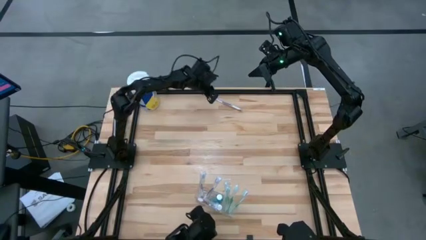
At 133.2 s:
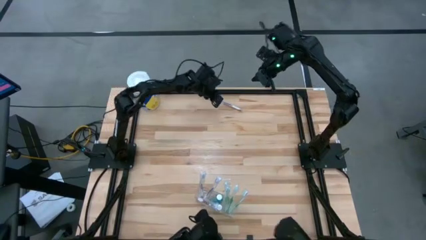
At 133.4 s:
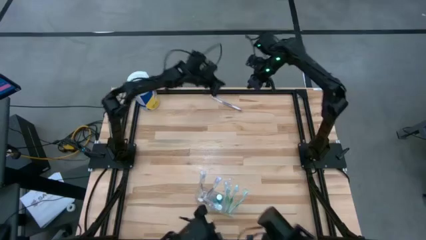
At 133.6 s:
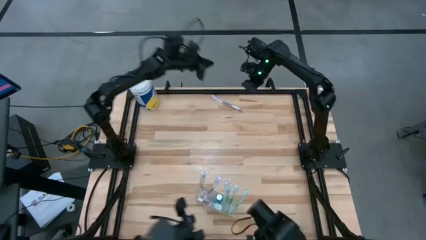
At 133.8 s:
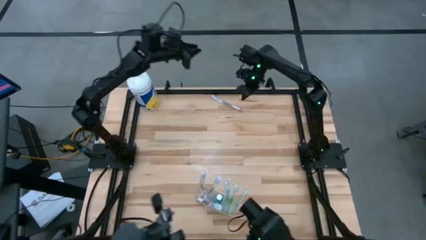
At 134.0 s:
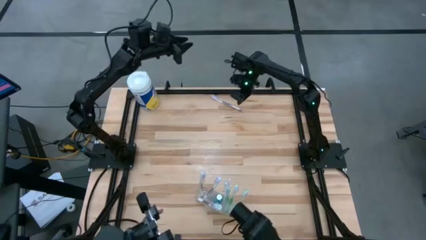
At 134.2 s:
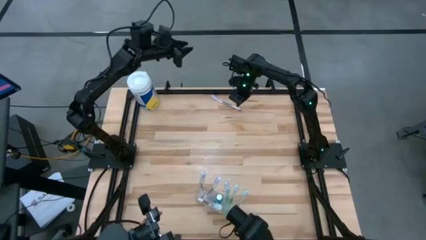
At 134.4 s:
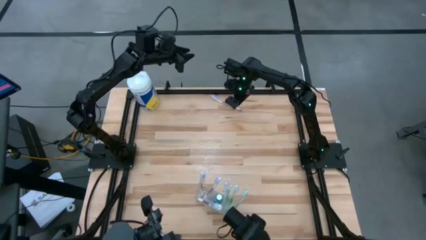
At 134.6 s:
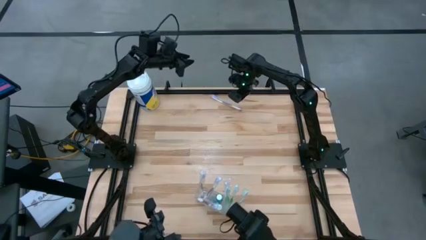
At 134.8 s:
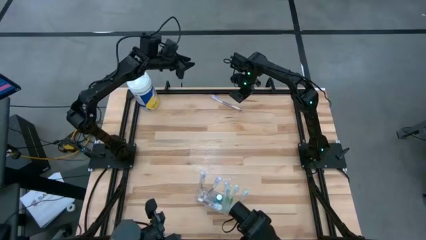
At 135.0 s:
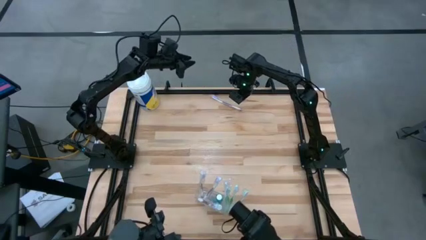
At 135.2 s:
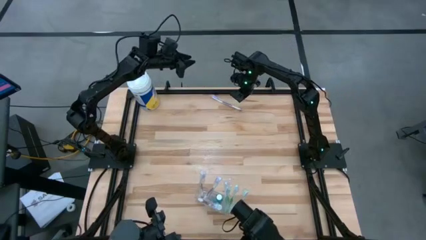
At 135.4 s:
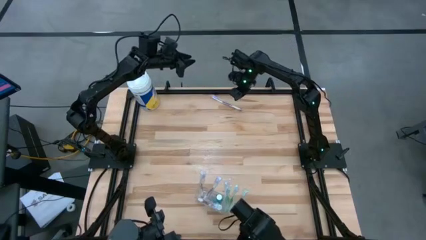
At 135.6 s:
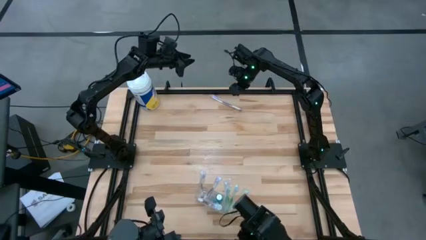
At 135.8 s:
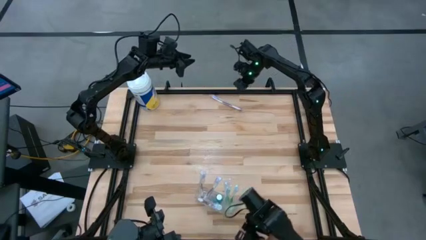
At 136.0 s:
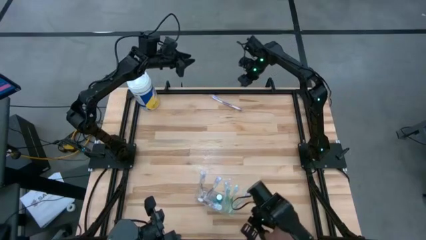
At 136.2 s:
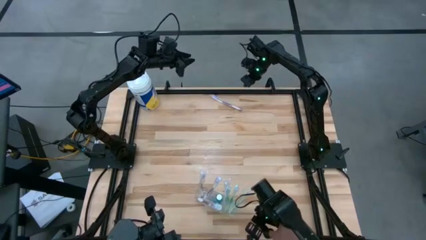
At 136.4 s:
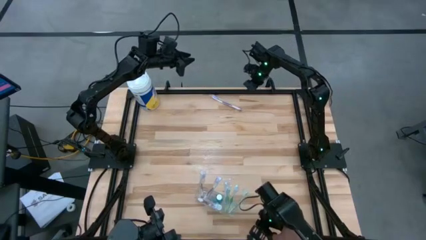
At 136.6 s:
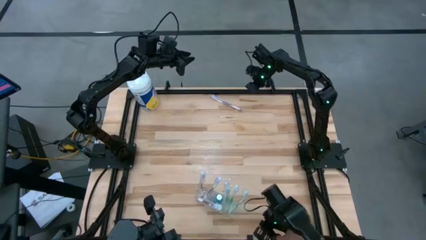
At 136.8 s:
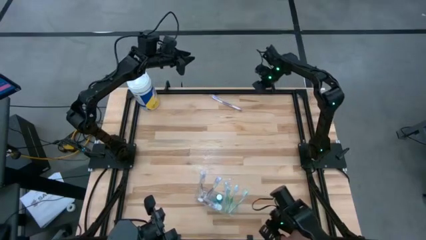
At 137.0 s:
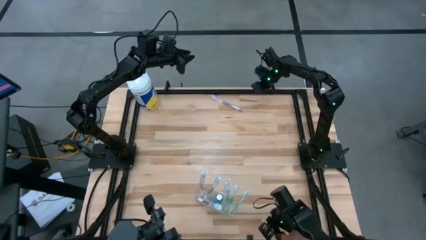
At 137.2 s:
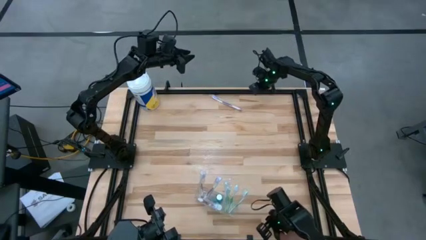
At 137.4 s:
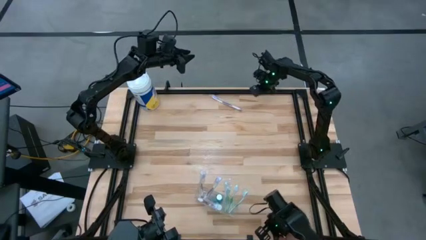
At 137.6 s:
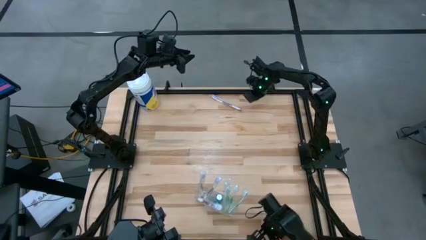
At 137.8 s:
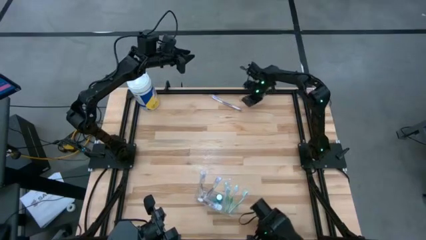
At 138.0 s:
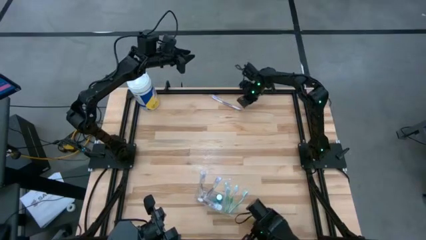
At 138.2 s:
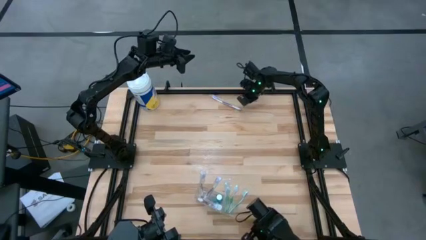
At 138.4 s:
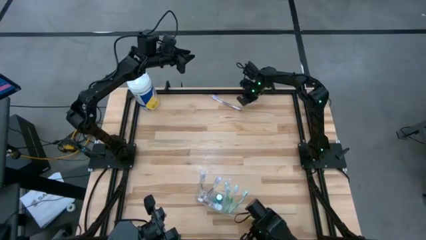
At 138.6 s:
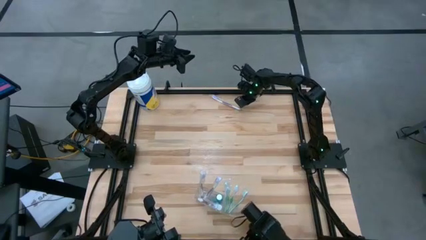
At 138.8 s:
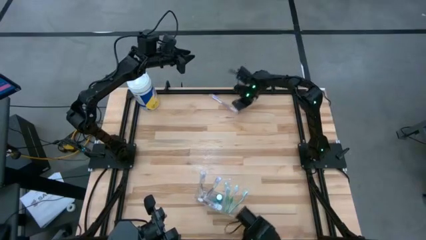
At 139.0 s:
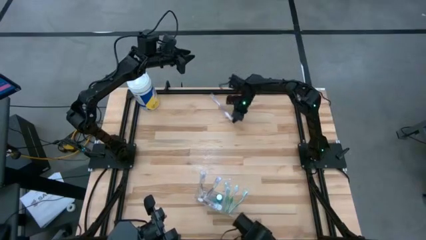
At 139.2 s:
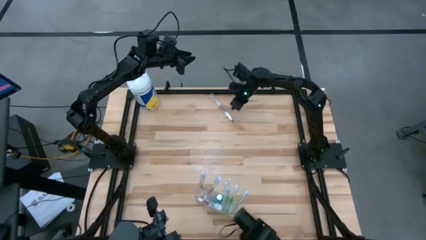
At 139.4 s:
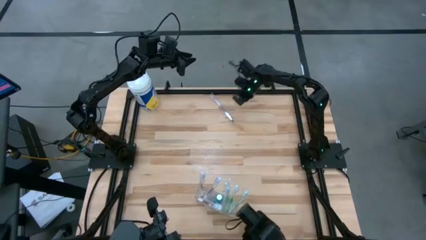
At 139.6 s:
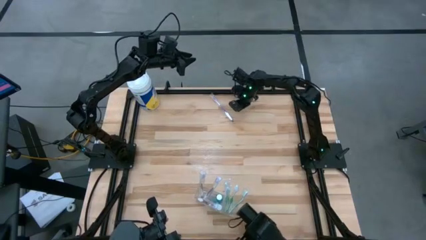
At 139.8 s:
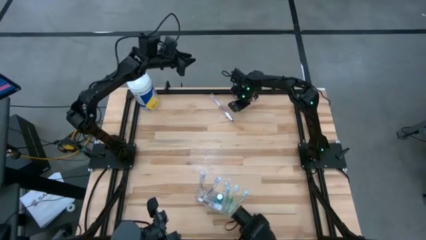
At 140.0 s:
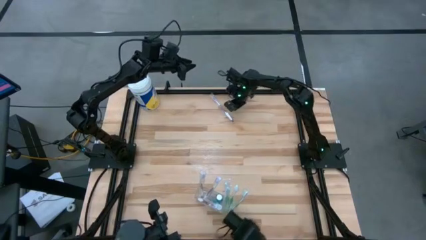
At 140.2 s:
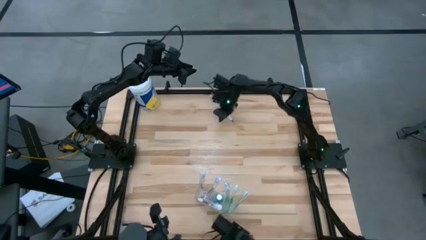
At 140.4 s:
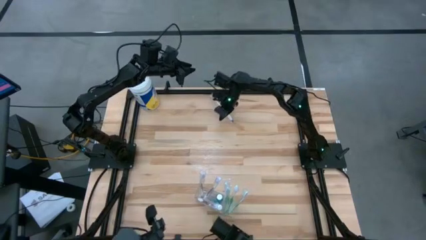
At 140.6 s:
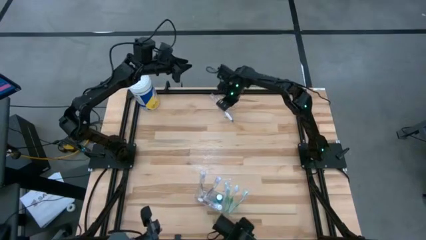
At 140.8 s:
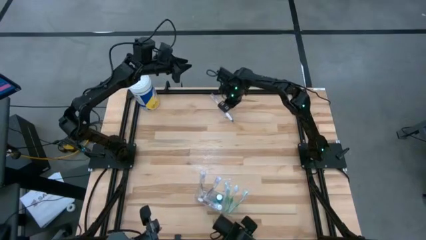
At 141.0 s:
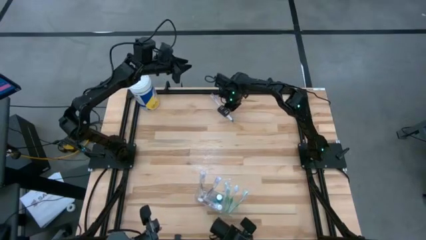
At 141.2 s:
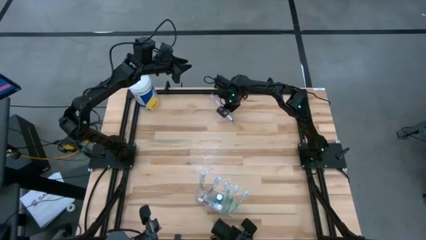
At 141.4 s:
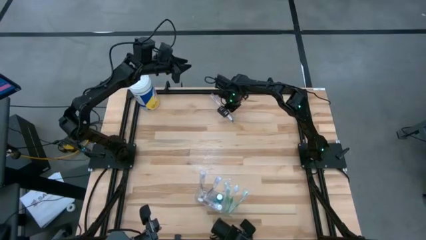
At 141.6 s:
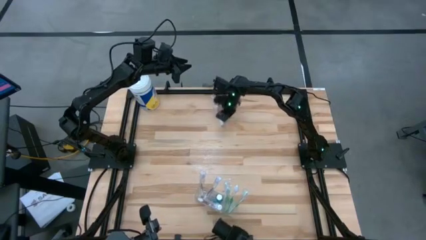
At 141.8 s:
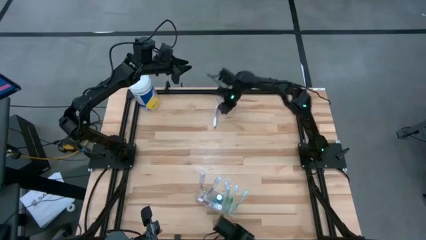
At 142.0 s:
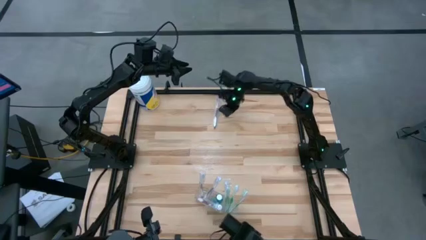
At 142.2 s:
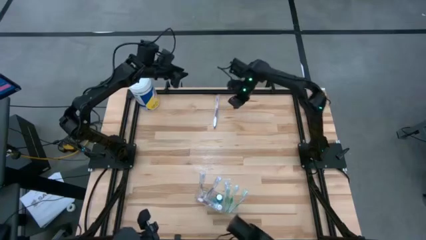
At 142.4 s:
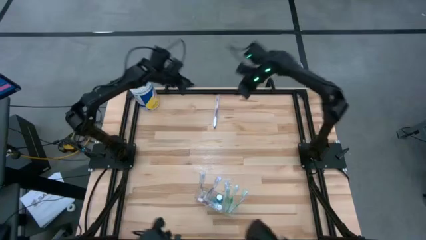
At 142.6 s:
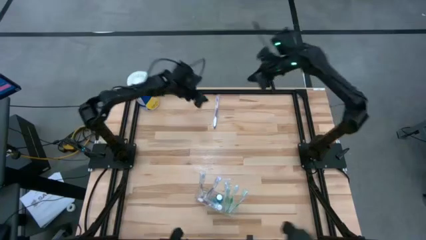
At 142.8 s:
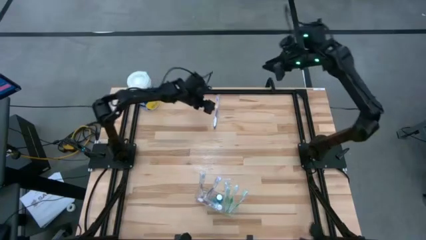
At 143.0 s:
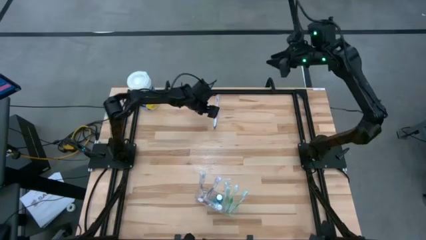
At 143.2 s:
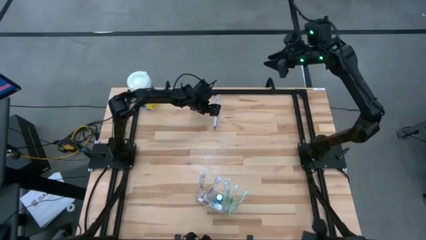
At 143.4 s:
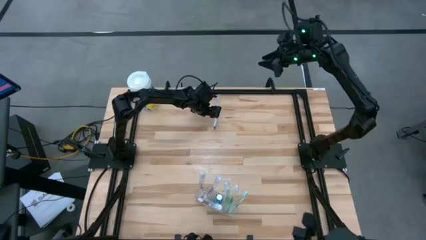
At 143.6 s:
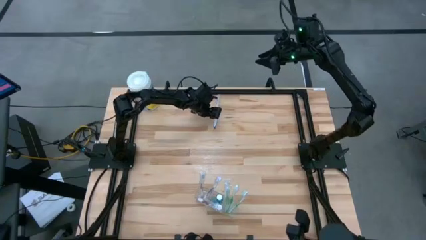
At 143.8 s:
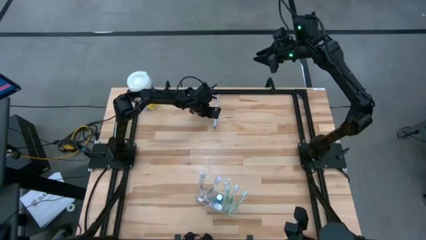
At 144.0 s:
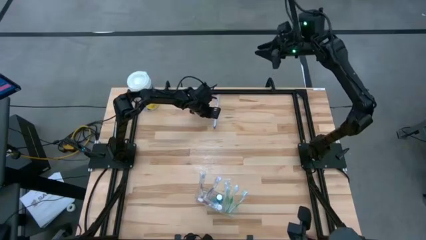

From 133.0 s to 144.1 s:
Task: Pick & Place toothbrushing station
Put the purple toothbrush in the transparent organizer

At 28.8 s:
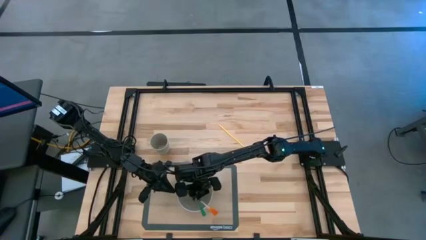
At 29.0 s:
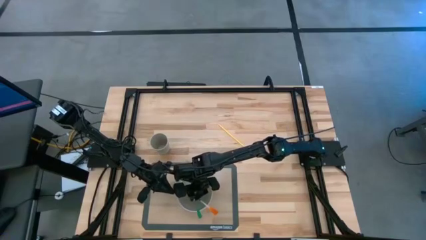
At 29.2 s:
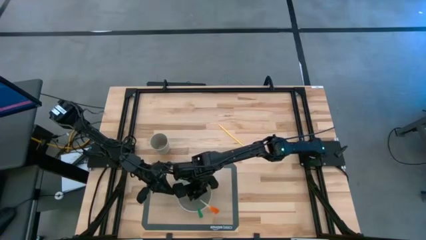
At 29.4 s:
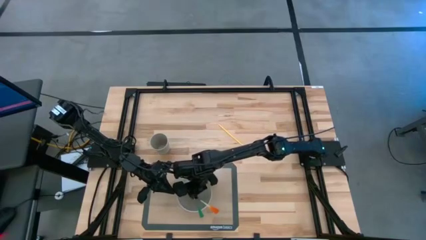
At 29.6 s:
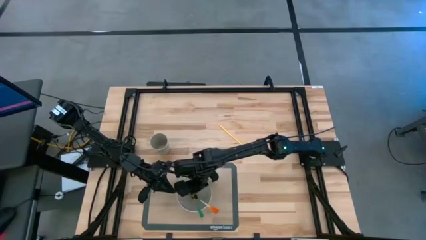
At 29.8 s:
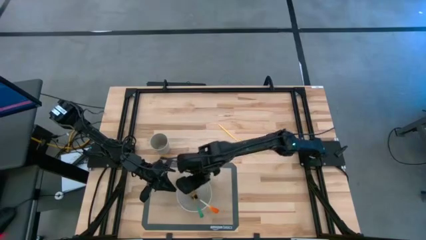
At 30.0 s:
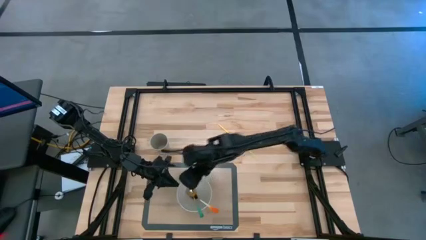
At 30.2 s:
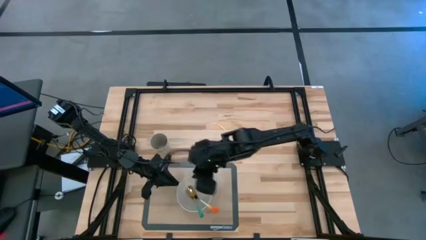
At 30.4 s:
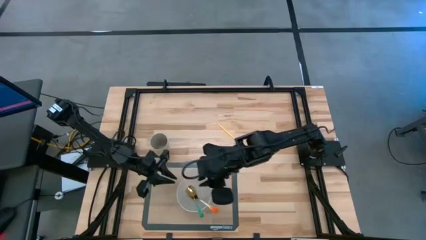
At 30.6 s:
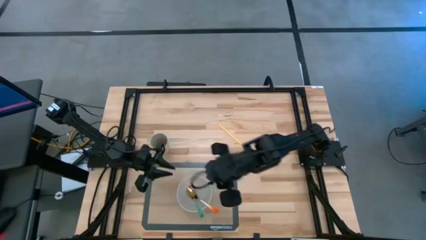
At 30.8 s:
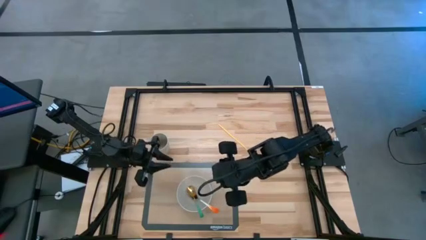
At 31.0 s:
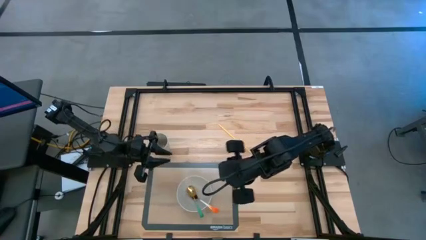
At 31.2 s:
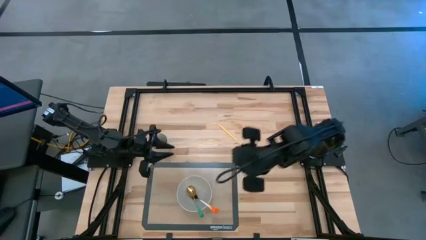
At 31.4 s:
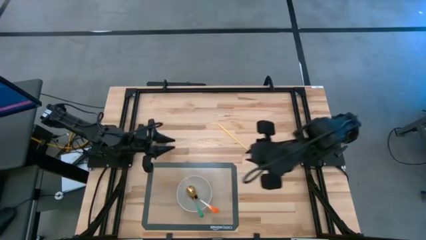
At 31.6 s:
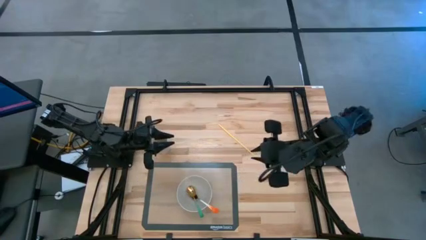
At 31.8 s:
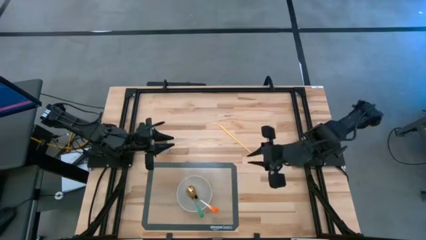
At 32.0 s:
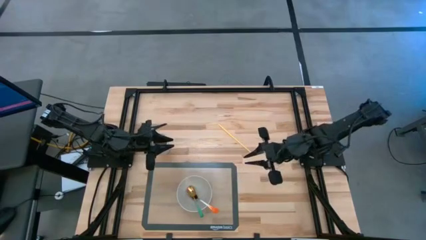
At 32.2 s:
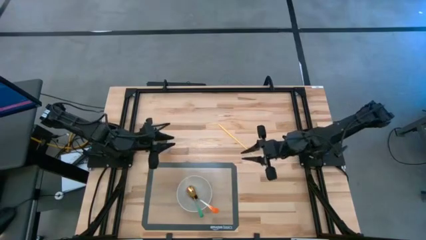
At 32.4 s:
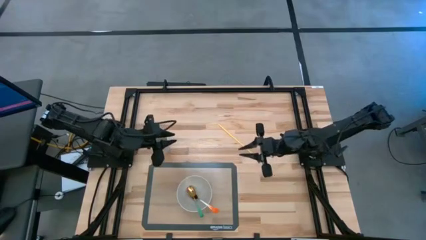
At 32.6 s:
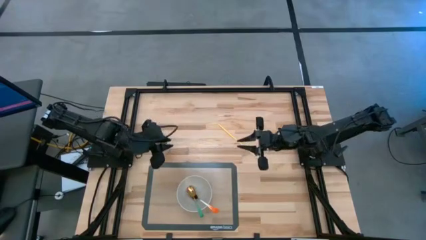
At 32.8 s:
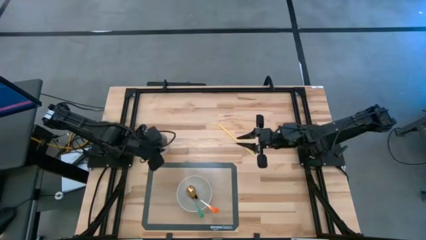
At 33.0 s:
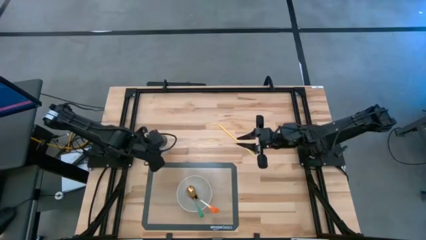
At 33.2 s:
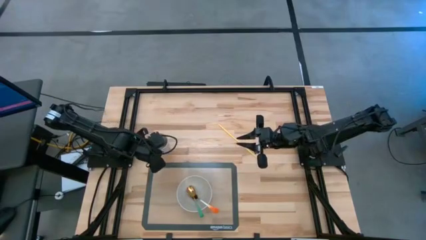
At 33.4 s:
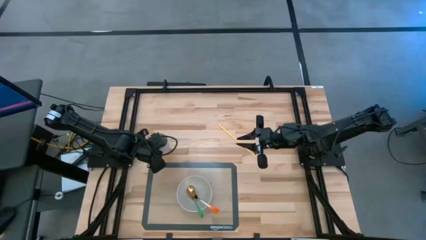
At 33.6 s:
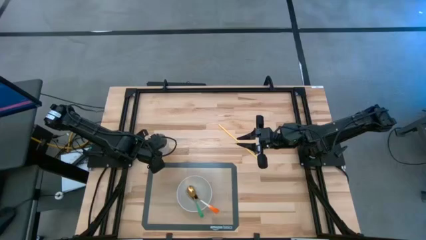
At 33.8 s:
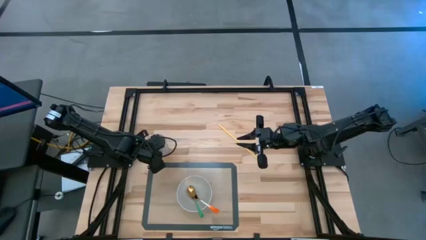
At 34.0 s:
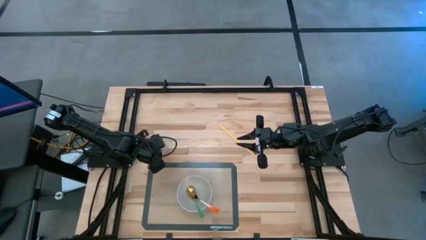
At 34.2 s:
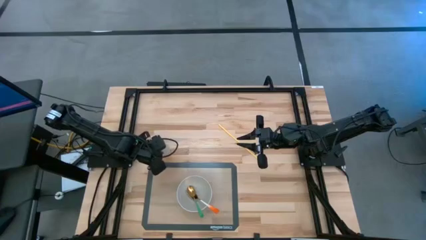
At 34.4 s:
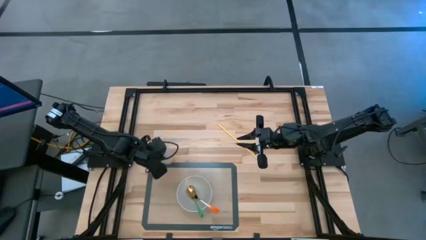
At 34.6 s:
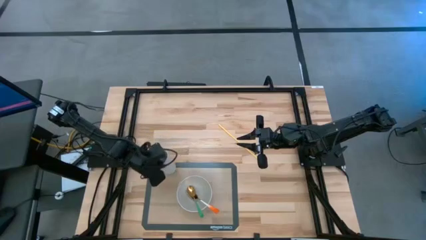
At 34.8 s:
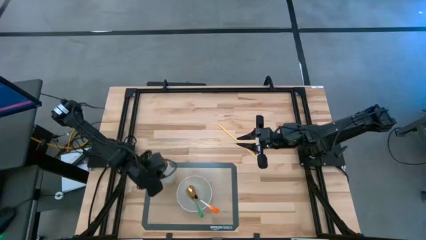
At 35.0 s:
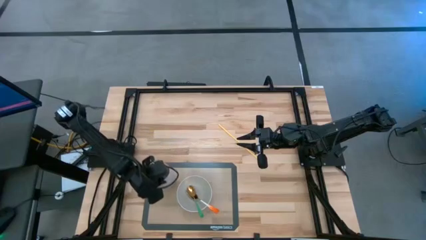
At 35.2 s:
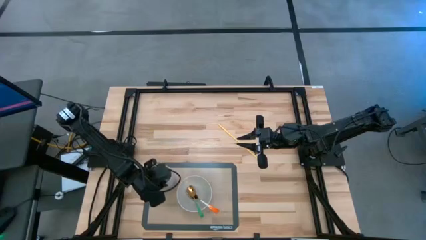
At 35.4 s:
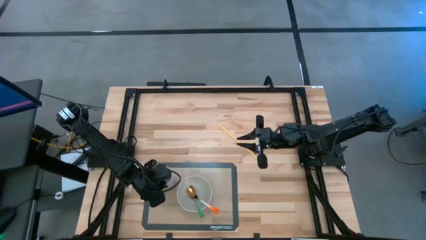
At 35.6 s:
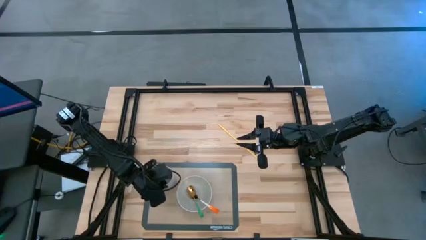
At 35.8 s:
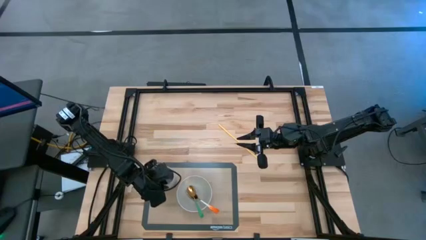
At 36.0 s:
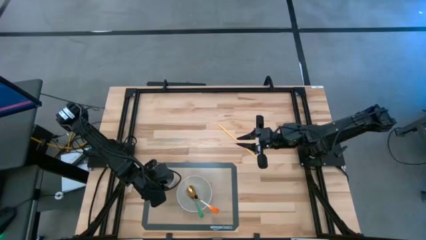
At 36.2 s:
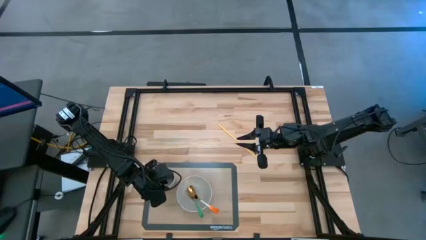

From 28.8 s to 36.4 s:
Task: Pick & Place Utensil
Put the white cup on the transparent mat to the top left of the white bowl
